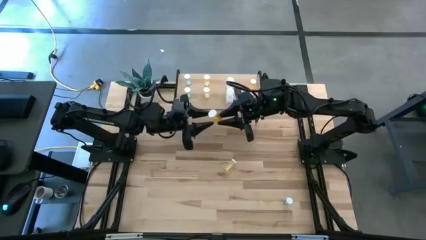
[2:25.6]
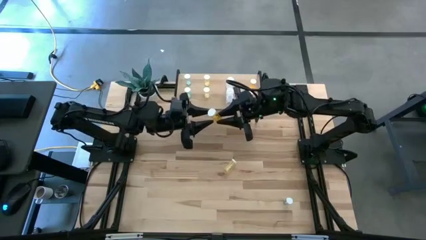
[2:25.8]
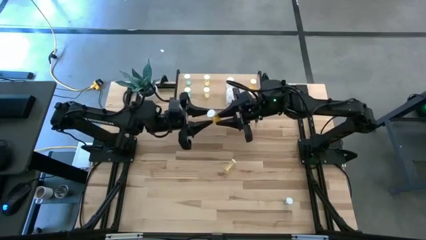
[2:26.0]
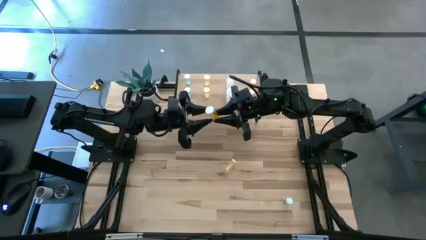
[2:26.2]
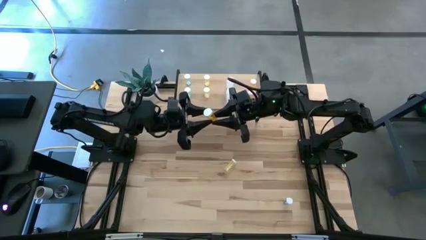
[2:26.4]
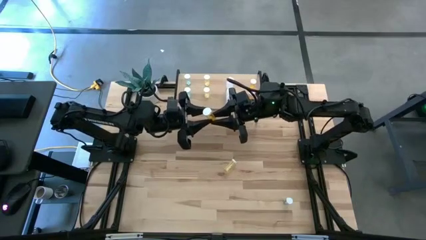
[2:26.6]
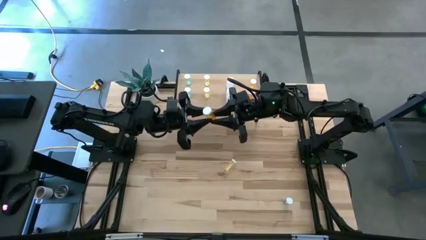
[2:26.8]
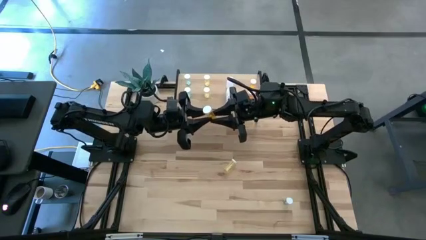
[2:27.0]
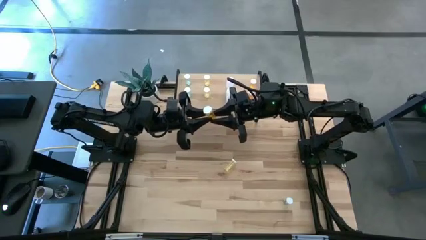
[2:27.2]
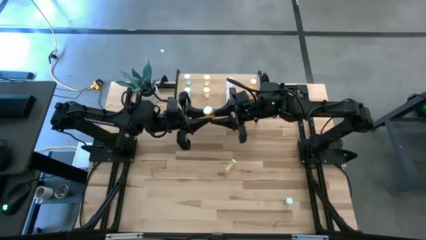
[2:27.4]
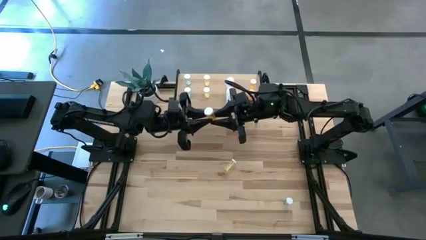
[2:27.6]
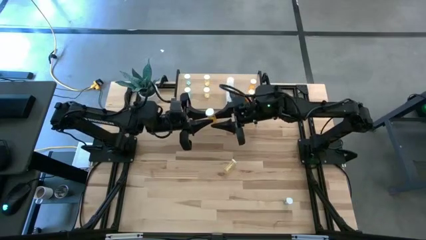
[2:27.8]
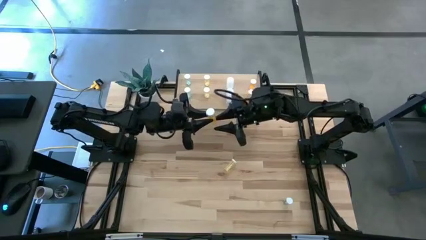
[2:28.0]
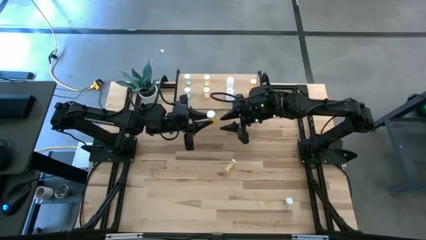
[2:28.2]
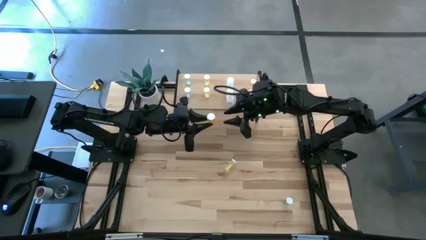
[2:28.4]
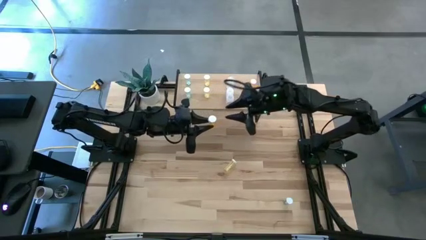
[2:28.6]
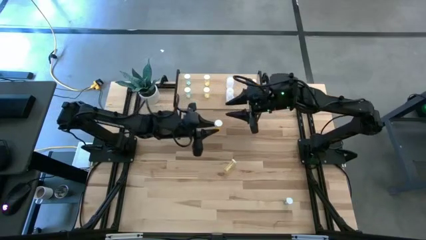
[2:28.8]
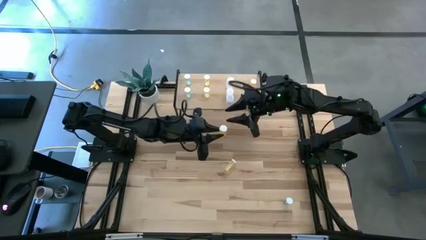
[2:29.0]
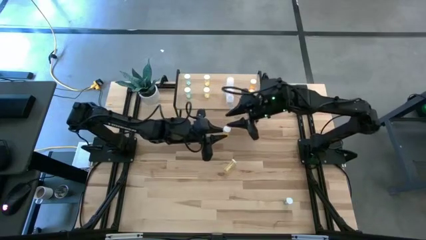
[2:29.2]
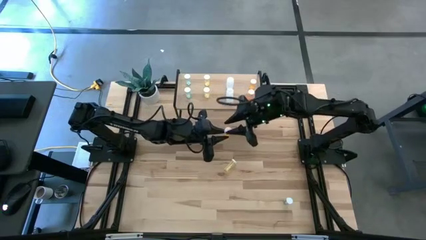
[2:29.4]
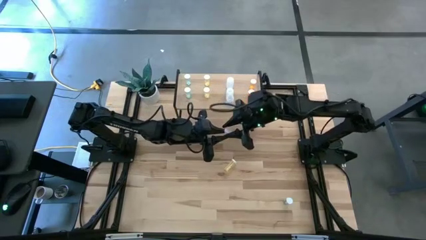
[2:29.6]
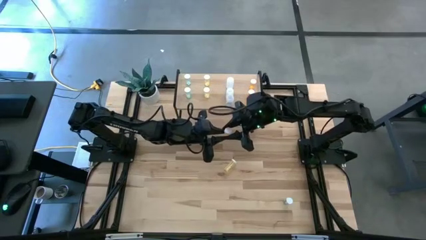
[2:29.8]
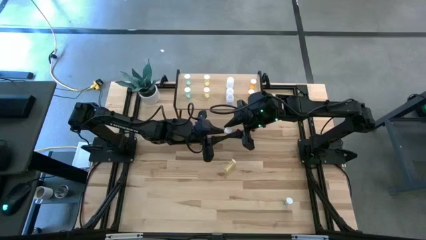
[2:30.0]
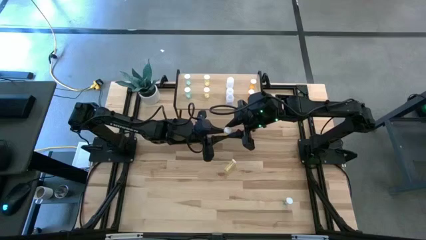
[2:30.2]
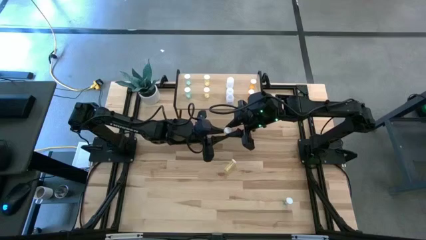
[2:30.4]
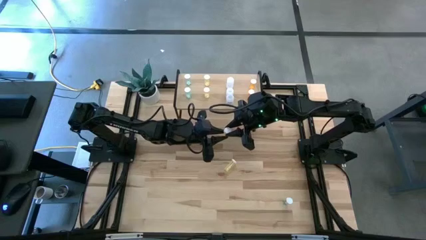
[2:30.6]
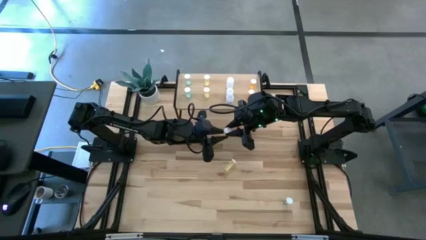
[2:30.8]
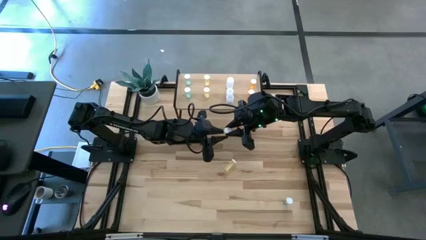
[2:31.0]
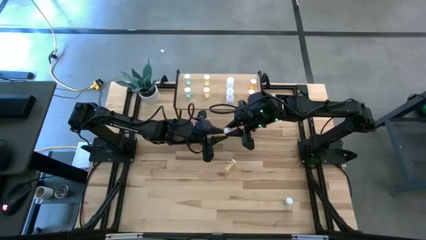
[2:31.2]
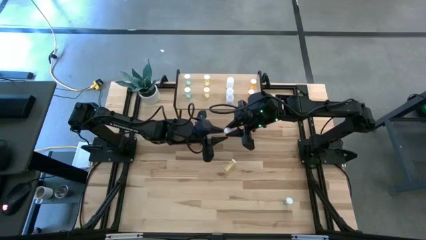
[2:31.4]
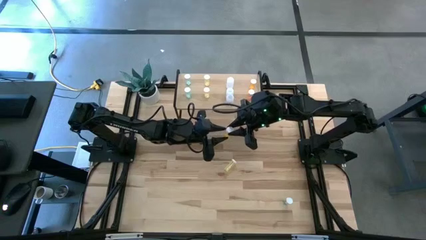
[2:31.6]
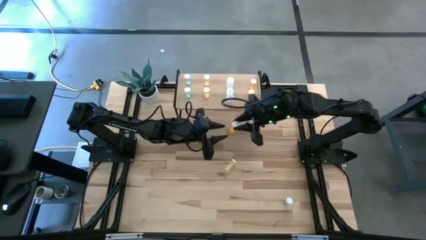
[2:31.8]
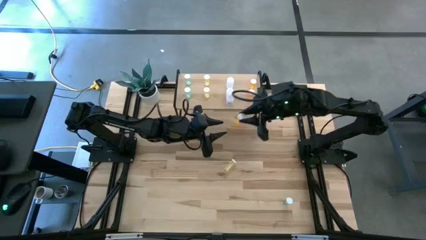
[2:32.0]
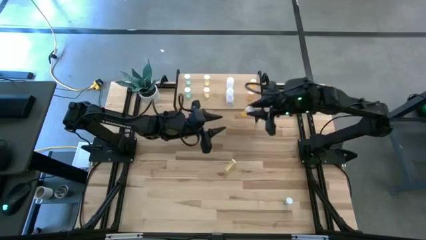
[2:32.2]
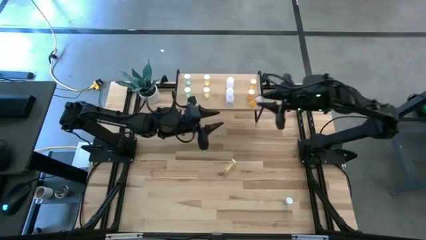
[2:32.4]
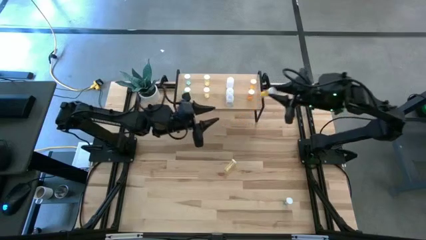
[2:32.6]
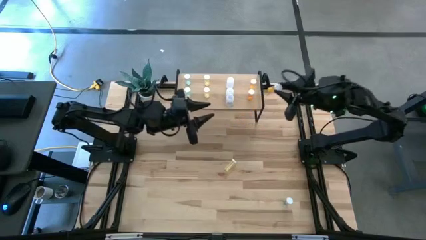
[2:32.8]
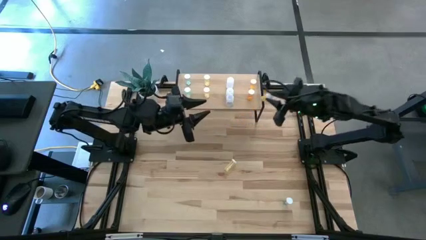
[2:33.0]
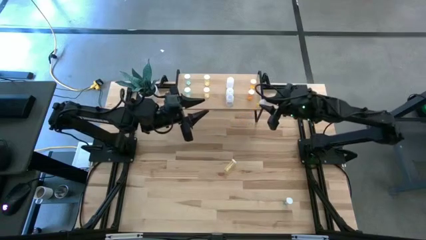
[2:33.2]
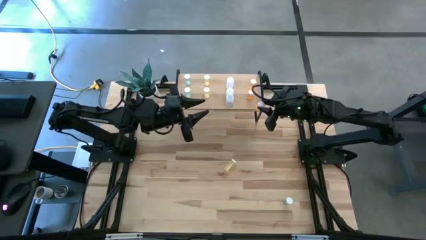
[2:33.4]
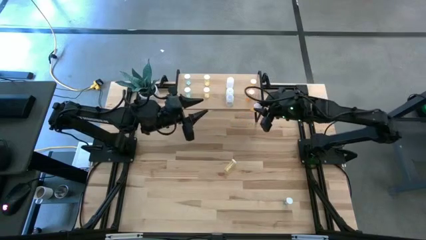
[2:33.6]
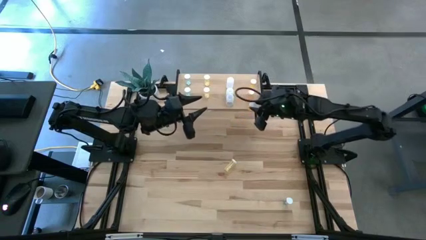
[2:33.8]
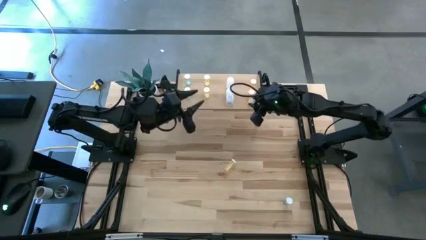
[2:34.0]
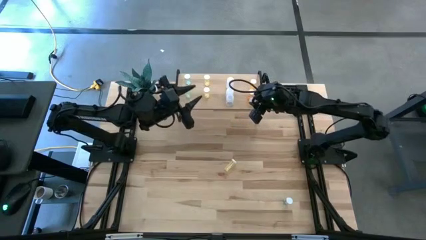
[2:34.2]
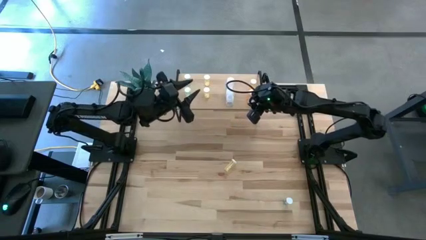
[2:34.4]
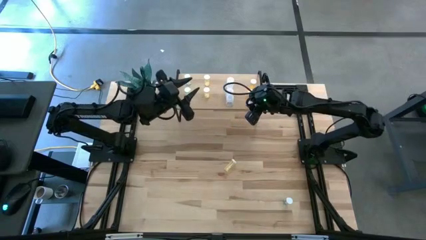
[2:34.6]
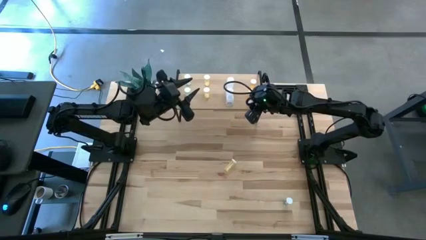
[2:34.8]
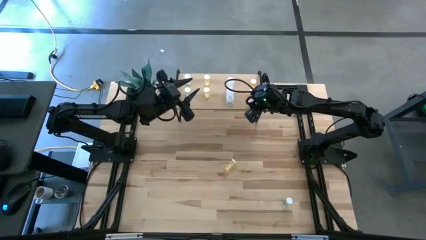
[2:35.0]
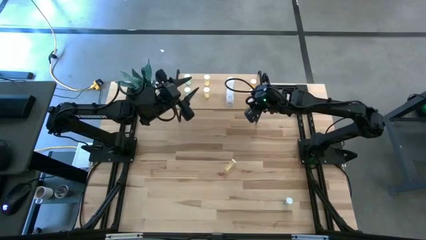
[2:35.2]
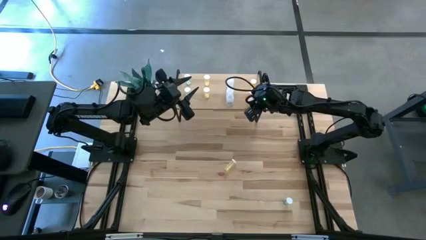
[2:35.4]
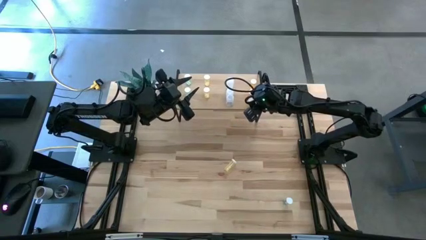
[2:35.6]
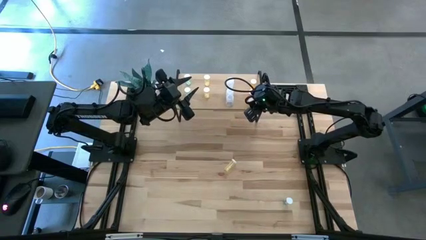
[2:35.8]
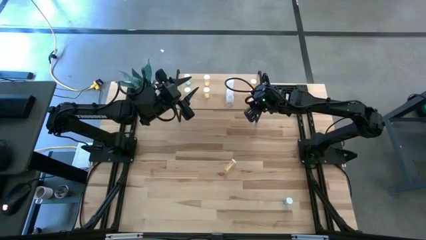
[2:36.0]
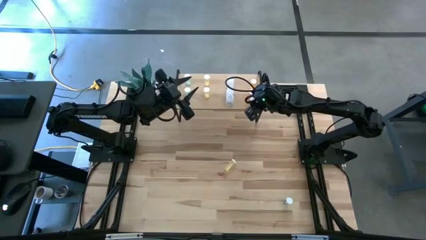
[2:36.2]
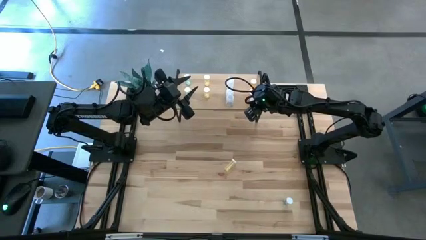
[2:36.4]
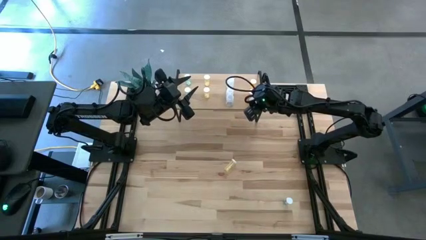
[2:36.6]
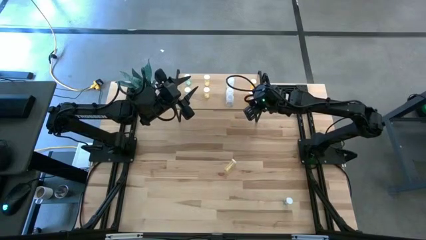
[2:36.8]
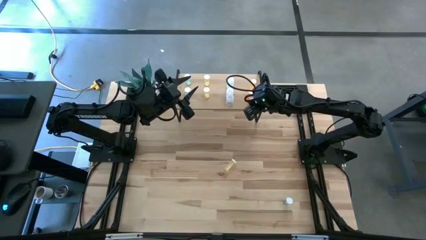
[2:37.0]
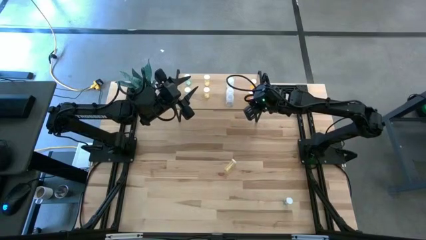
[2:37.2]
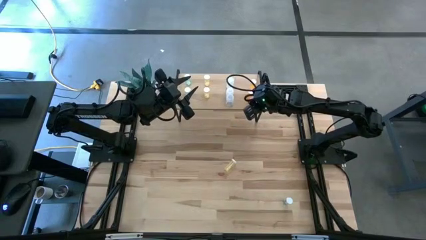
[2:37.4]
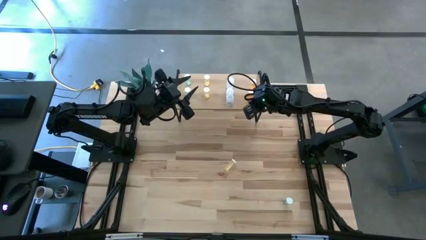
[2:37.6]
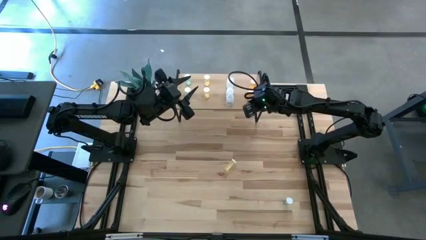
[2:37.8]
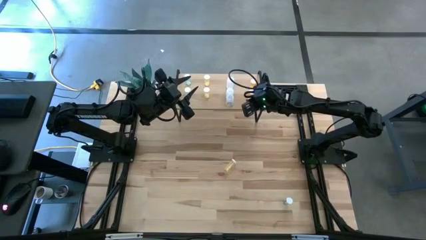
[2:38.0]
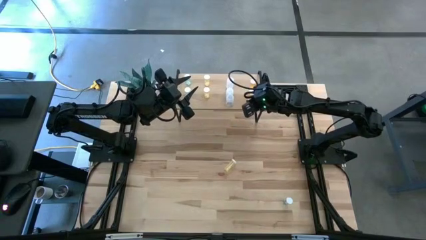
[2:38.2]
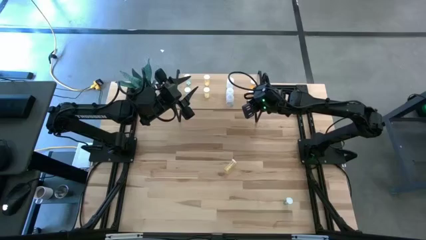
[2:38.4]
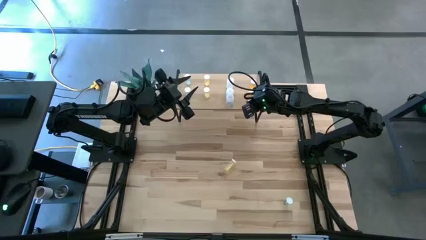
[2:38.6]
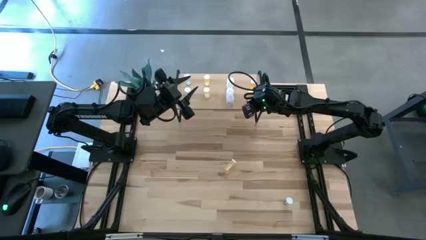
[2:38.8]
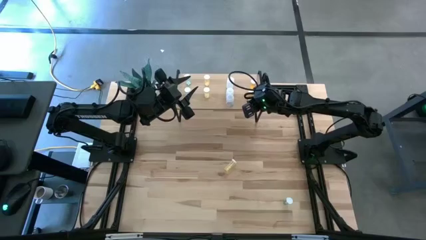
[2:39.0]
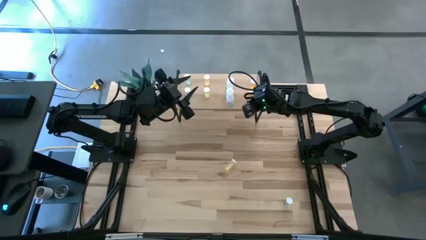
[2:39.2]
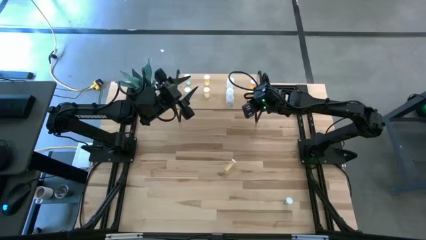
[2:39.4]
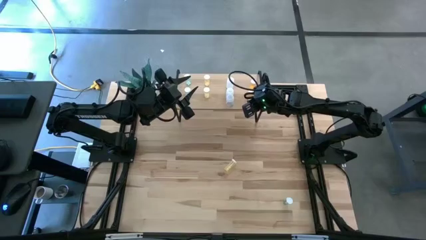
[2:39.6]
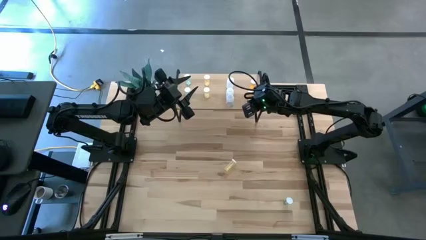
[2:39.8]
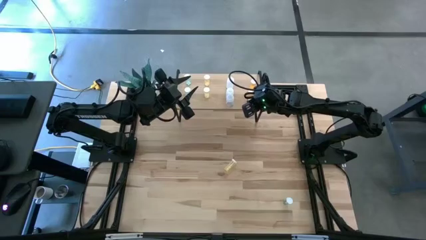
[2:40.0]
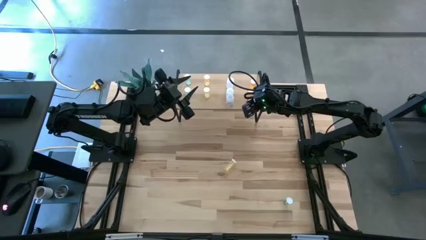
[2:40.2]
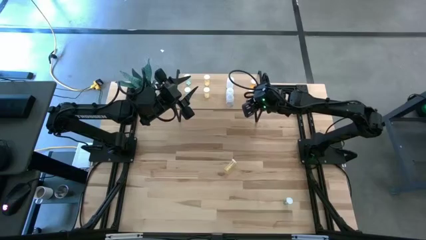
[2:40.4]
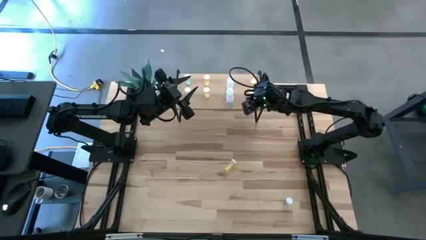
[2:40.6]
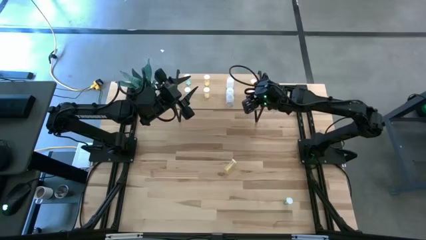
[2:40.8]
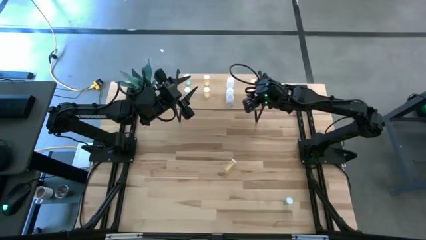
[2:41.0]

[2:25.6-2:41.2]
Task: Pick and place medicine bottles onto shelf by color
Put the orange pill bottle aligned with the other orange pill bottle on the shelf
